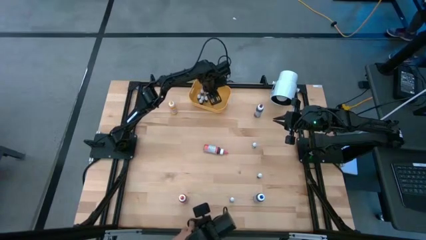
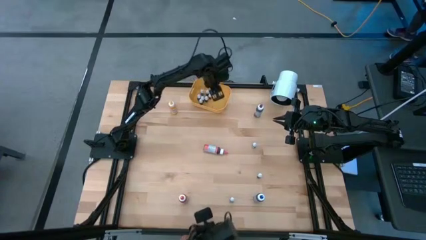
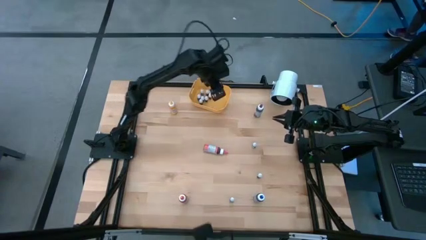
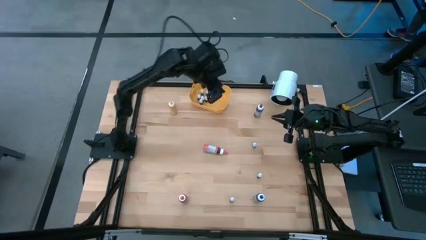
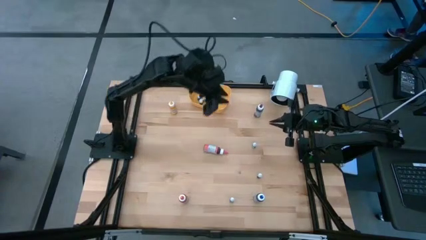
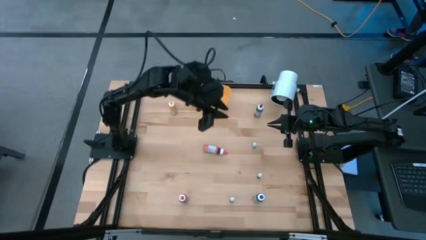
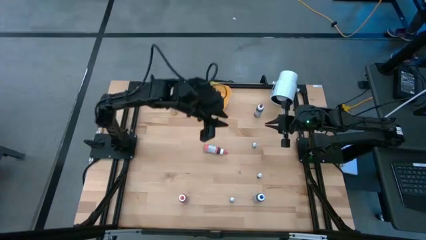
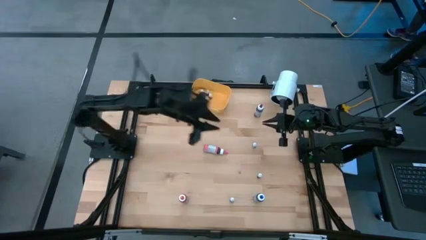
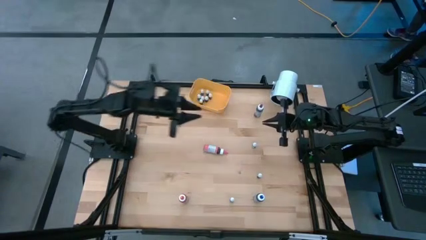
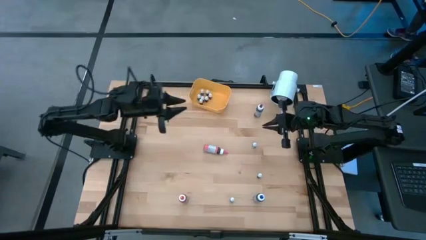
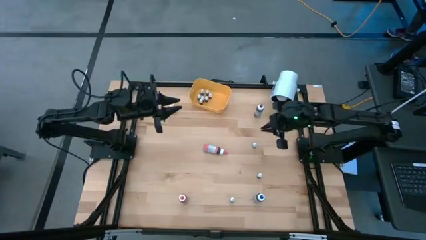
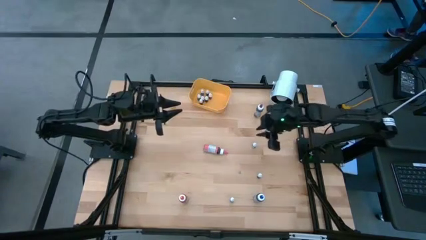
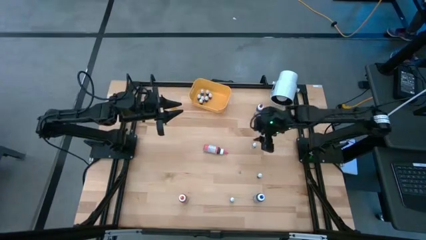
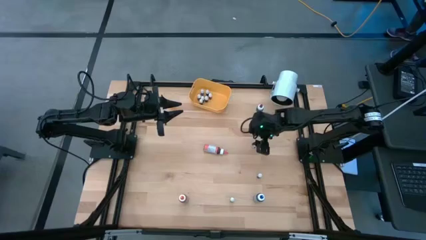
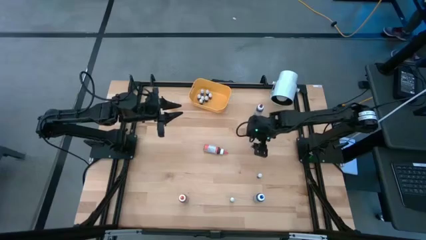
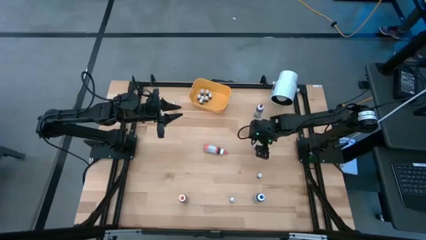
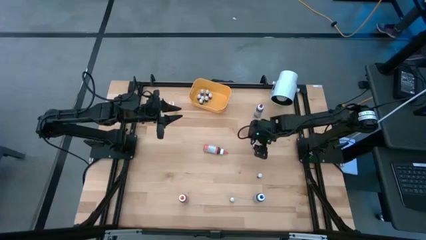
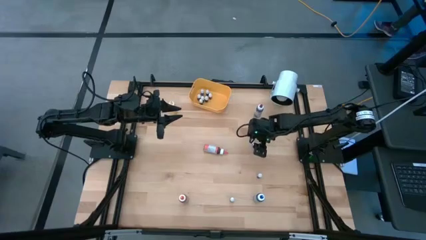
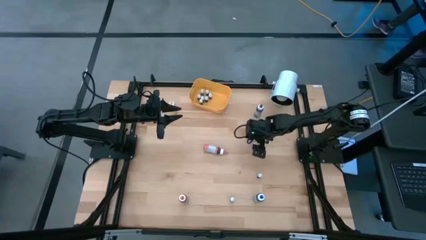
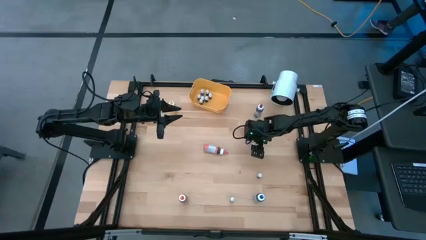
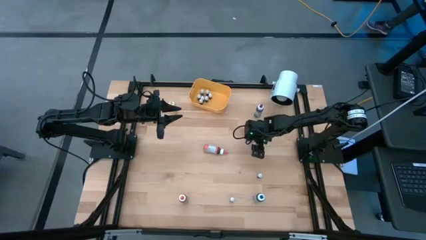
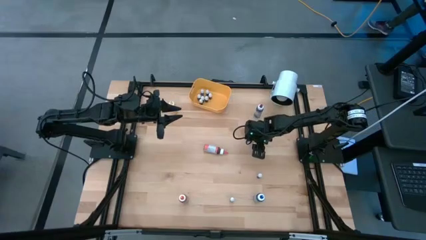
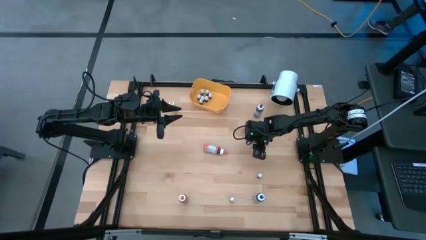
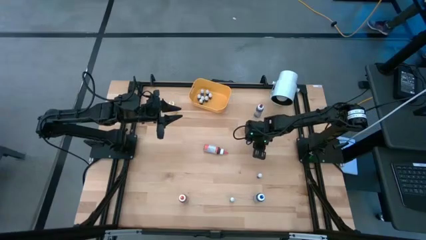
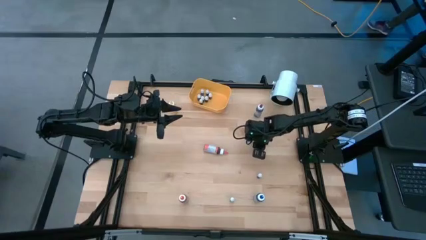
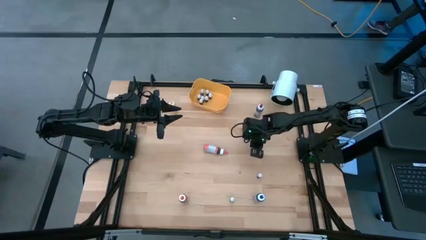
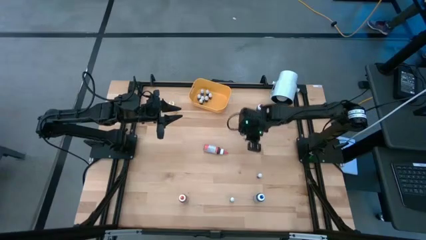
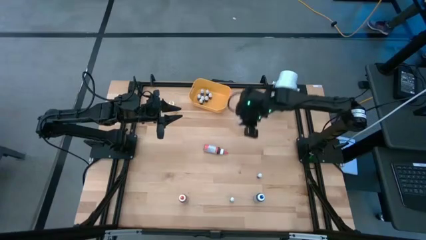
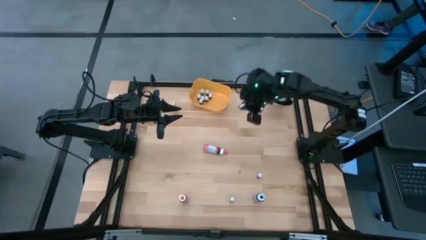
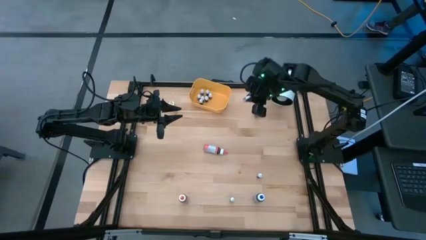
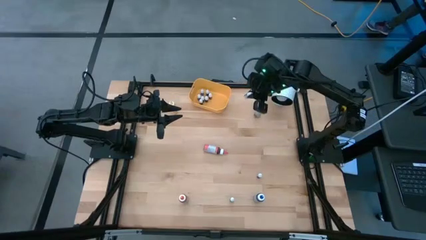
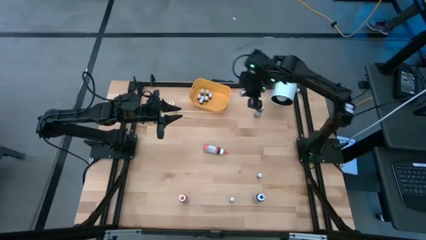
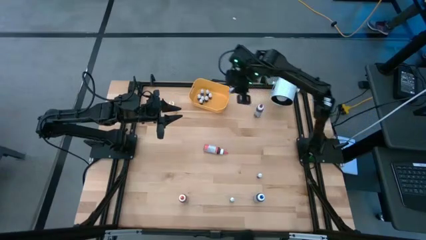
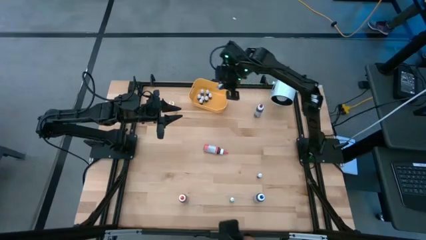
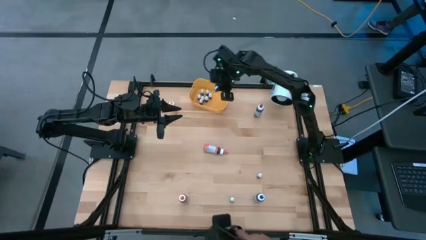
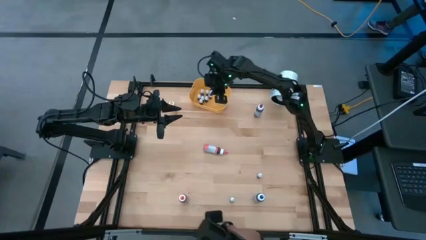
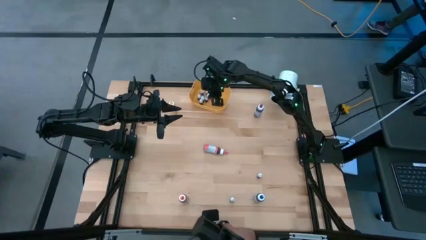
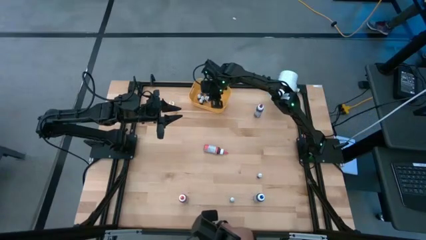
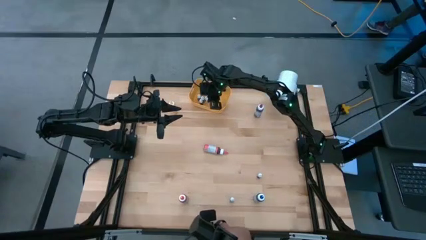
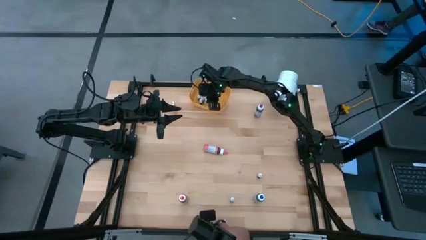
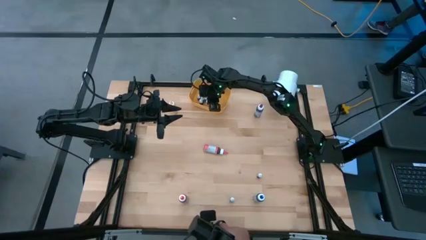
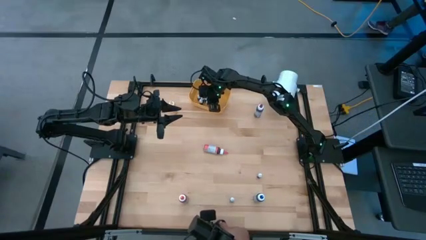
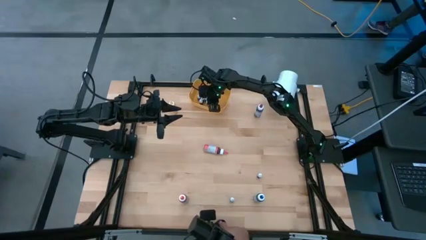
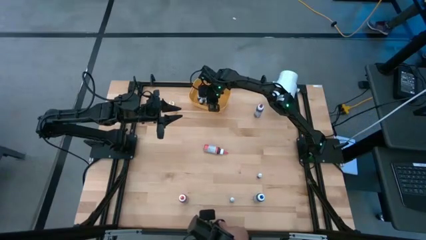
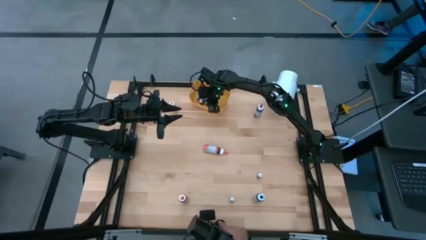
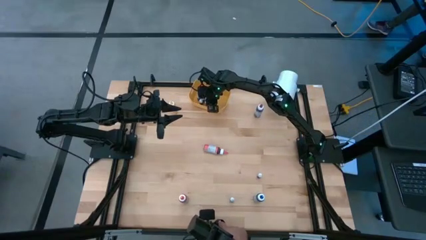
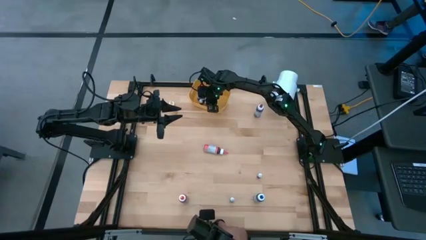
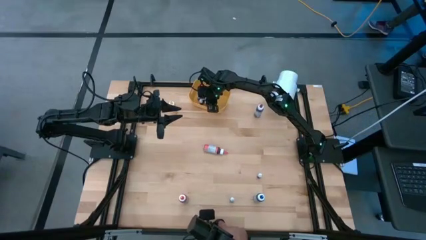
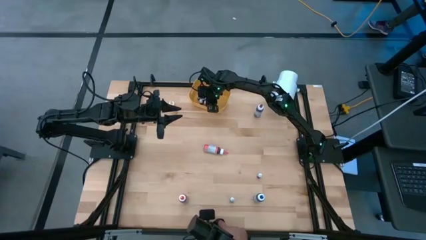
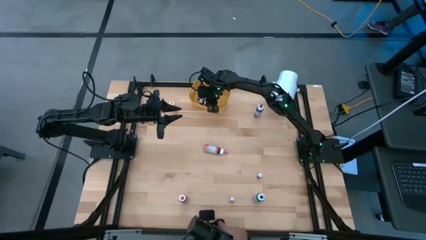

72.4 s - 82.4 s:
Task: Pick & Place food coloring
Put the small violet food coloring bottle into the bin

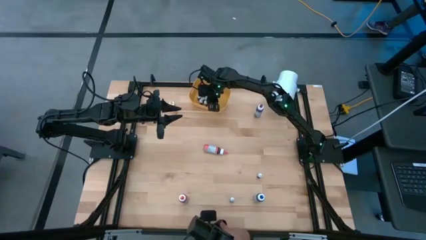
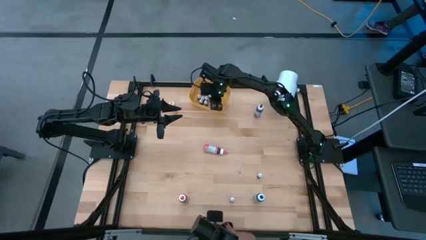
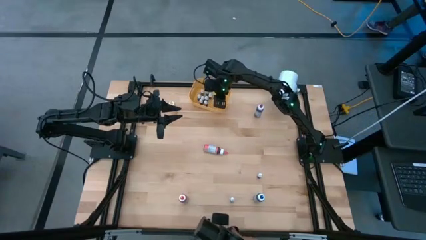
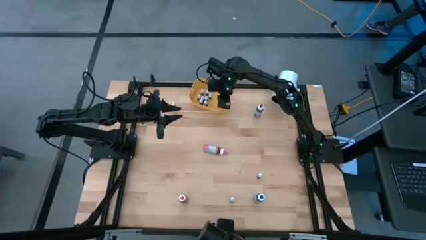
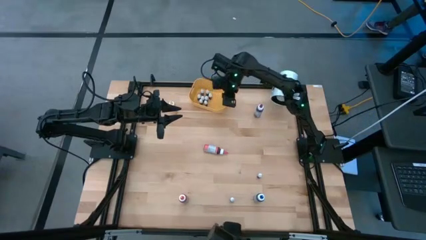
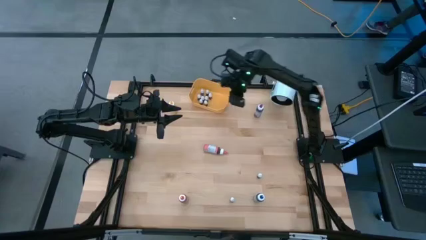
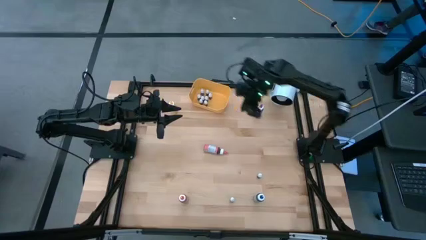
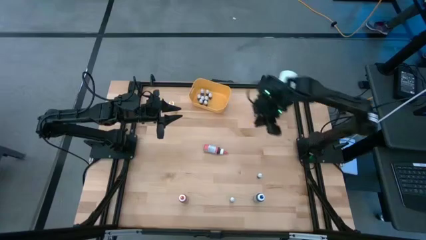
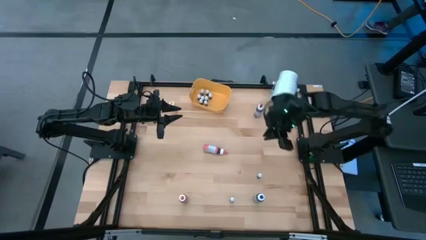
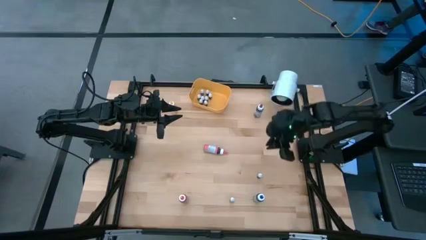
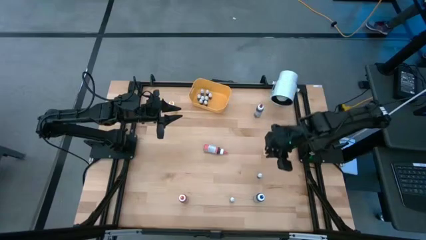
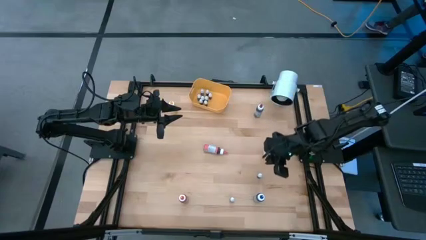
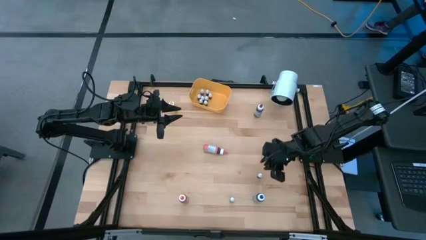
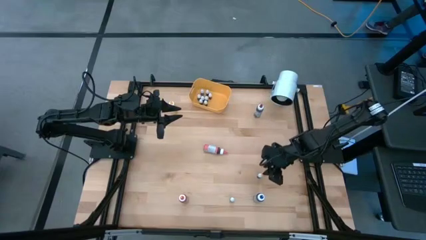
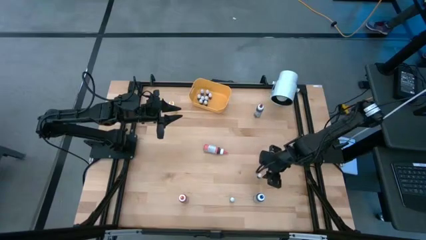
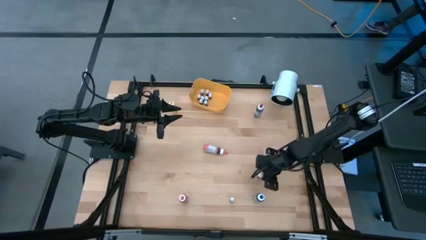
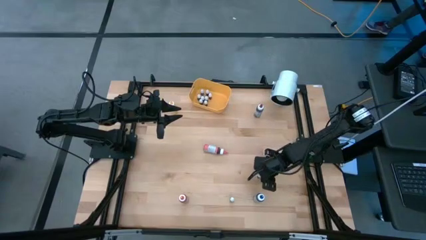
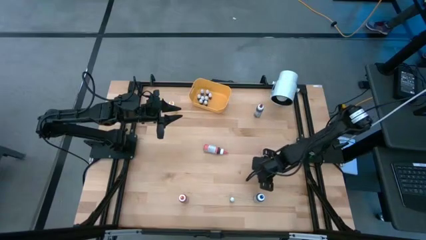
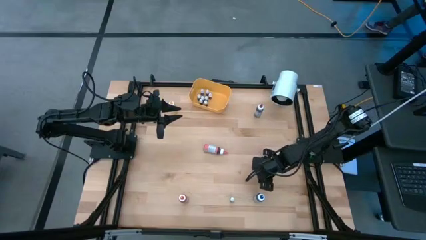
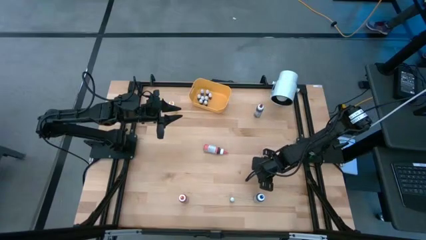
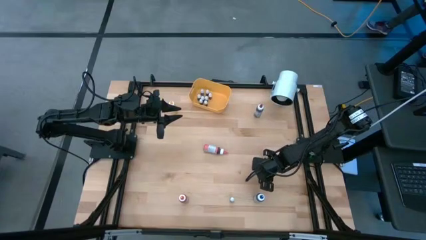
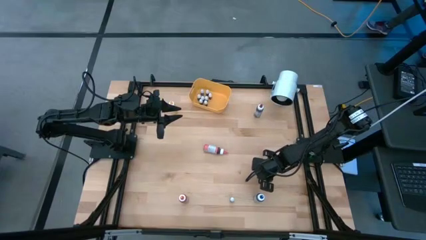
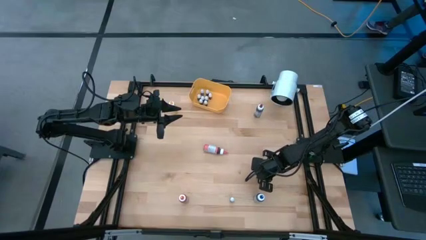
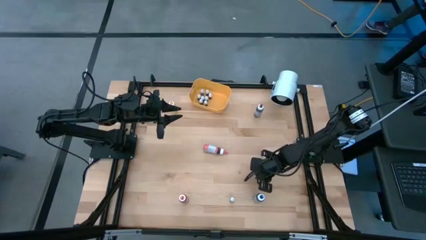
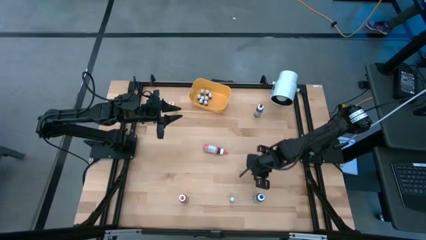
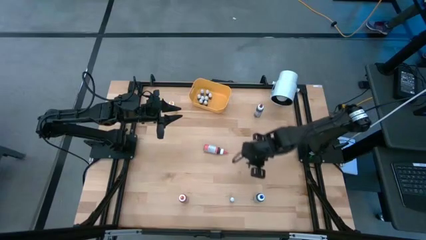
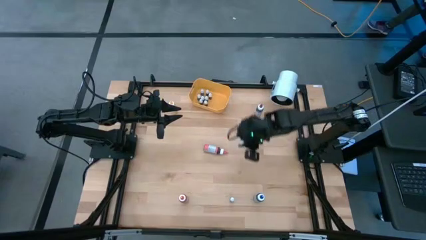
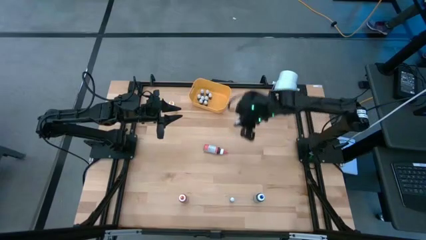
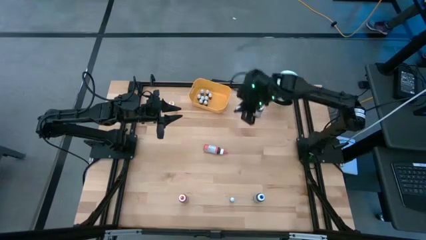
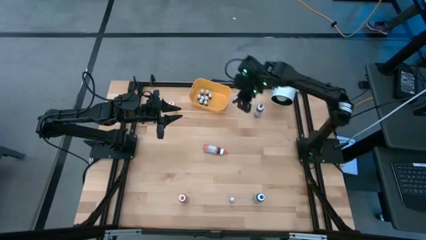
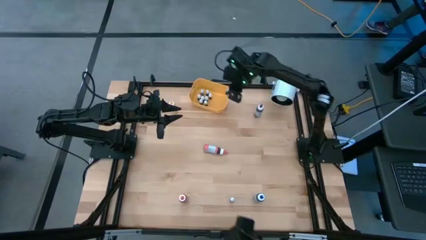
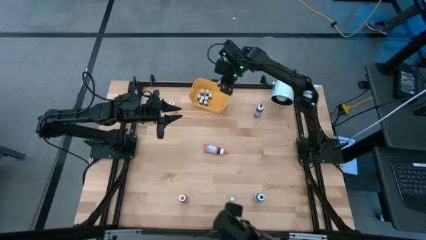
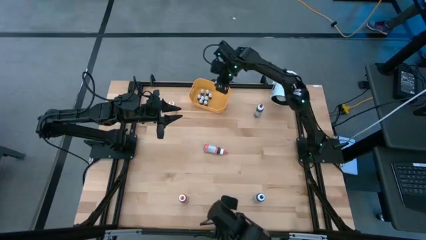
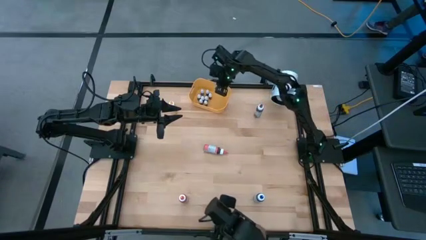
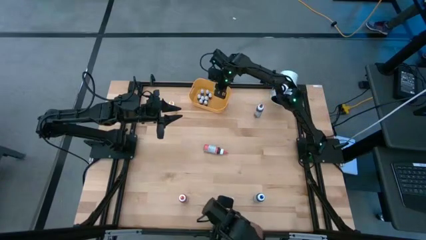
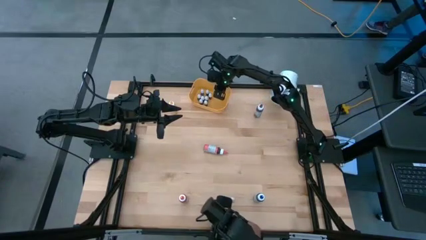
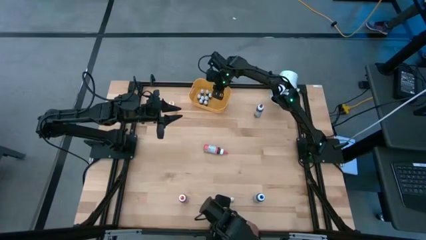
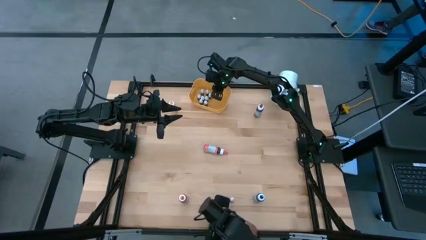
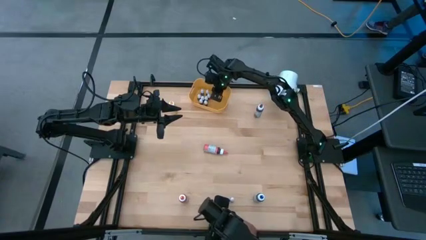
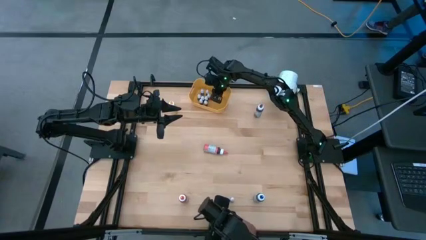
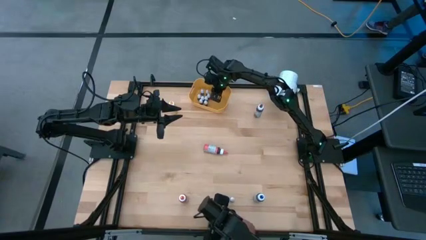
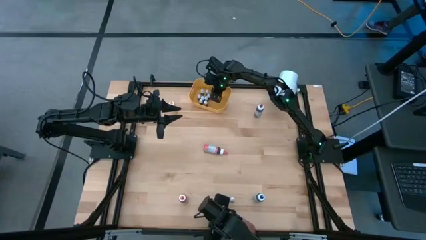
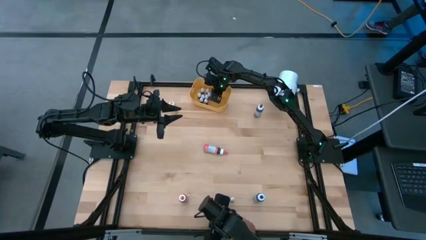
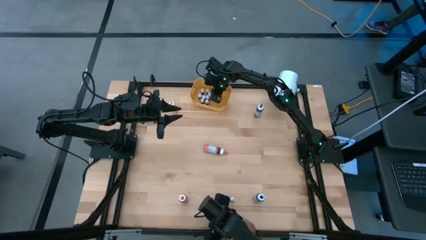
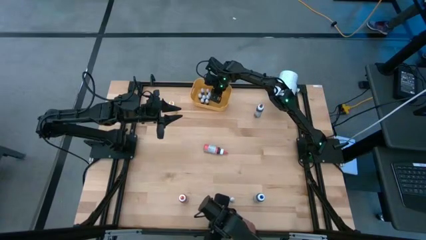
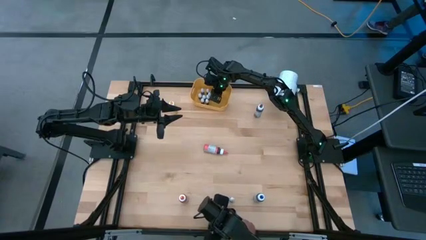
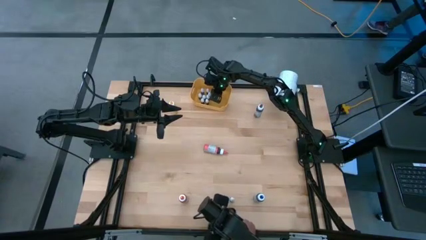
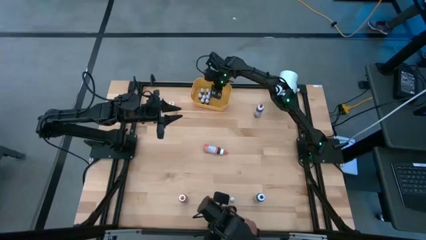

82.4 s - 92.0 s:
Put the top small black food coloring bottle into the bin
